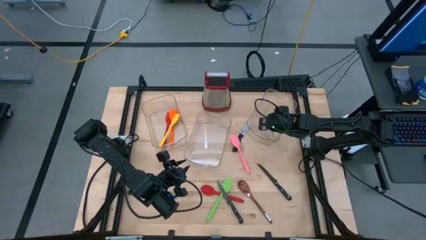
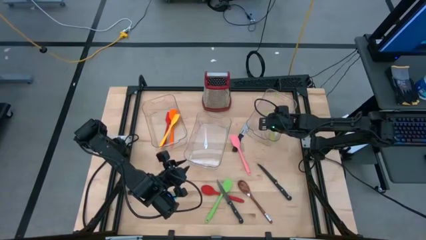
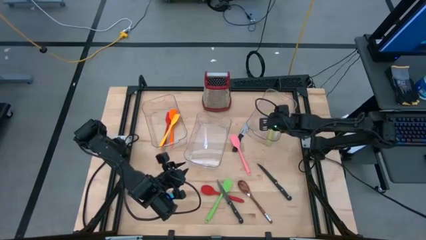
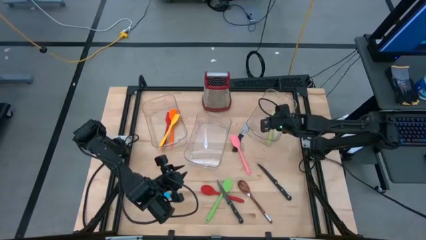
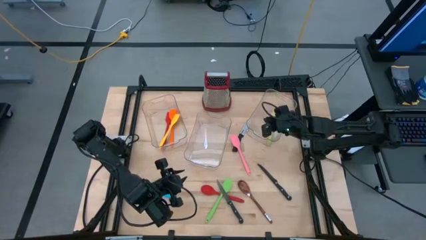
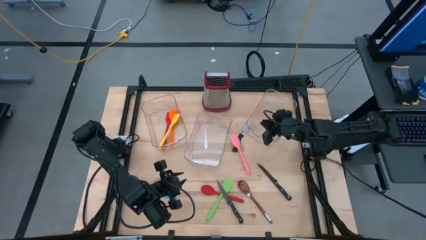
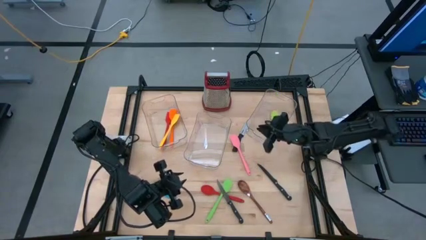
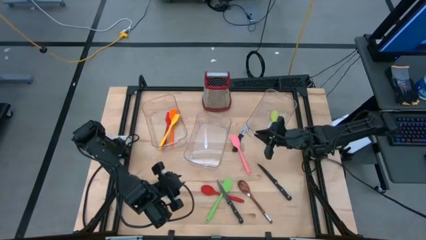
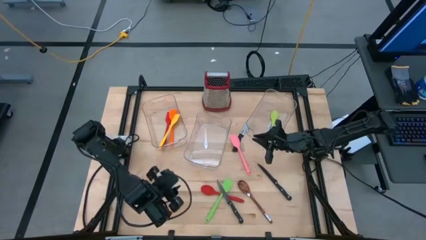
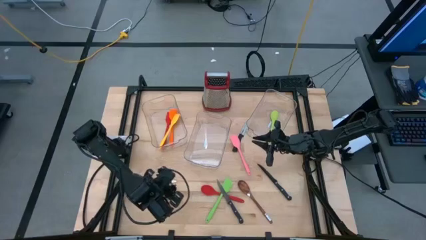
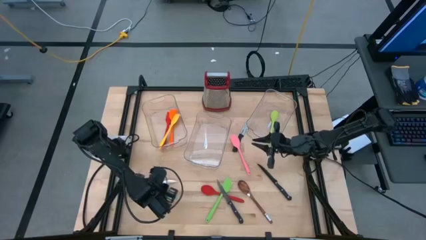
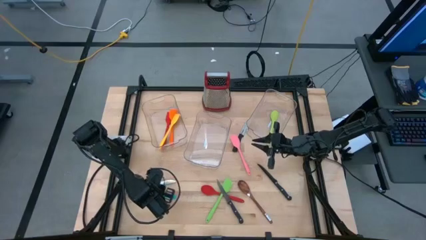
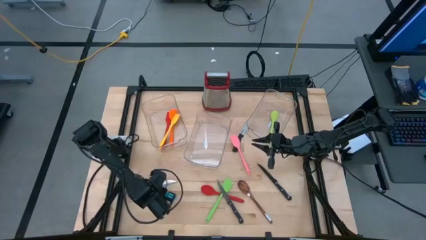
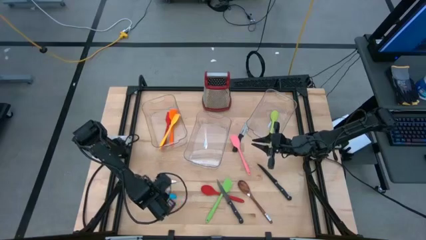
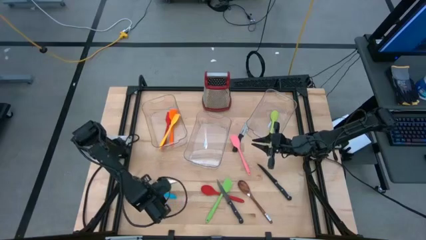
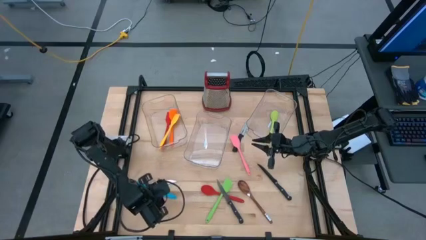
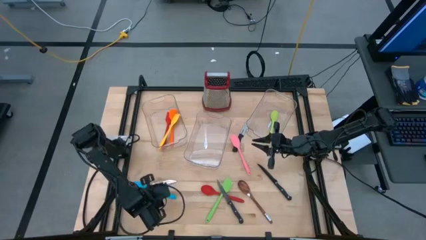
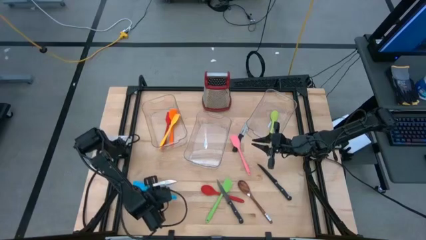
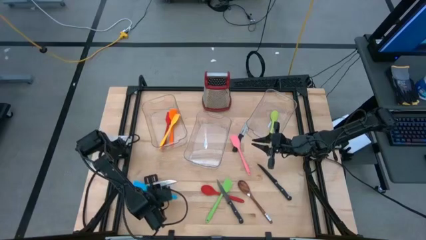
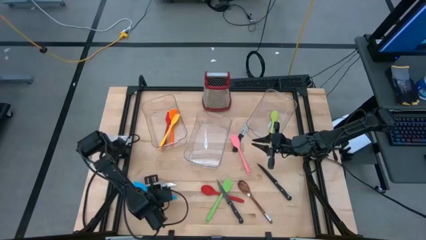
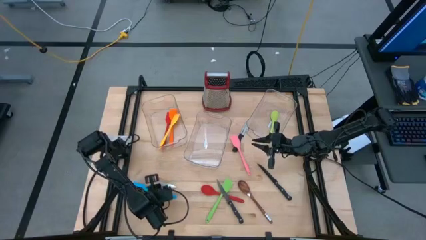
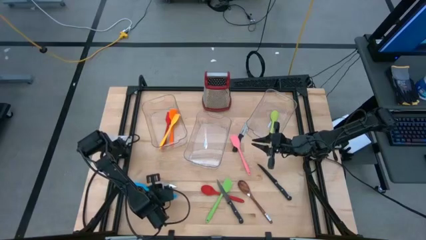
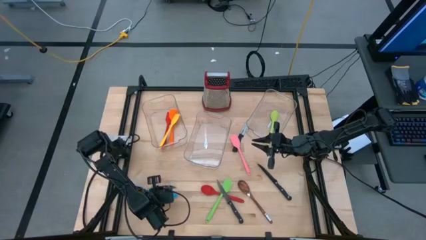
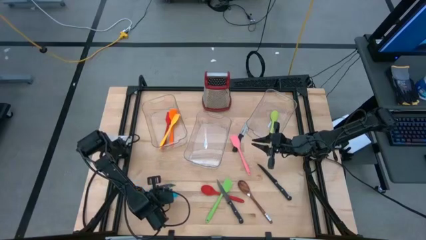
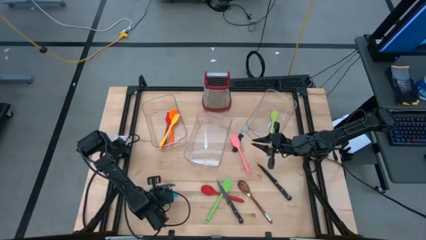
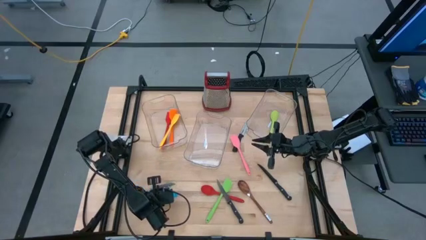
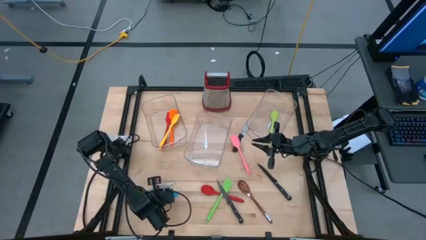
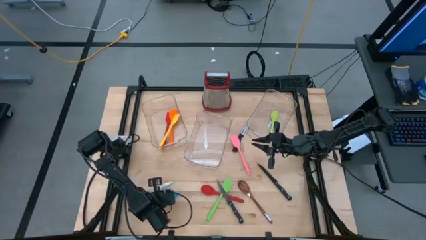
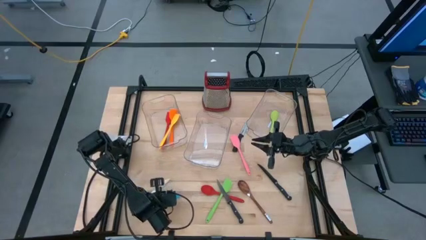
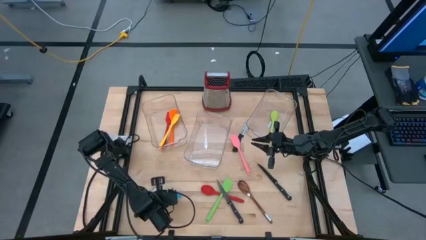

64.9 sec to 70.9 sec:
Task: Pick & Place Kitchen Items
Put the blue spatula into the left transparent bin

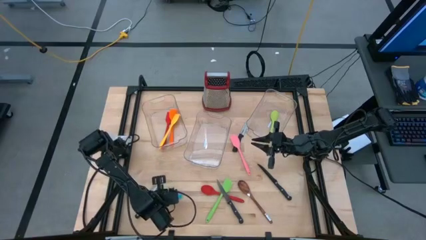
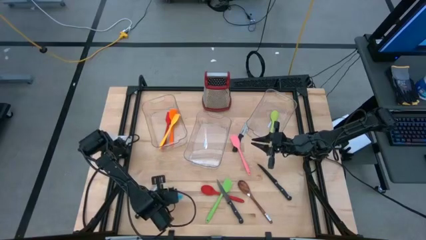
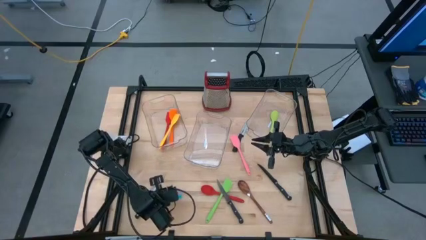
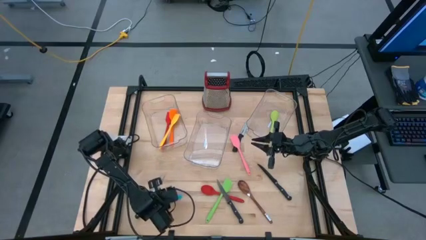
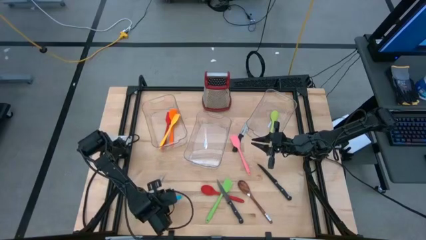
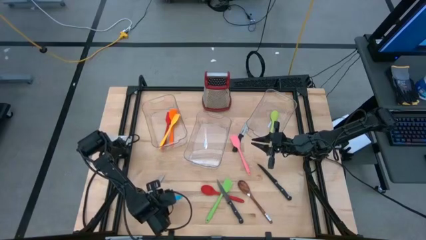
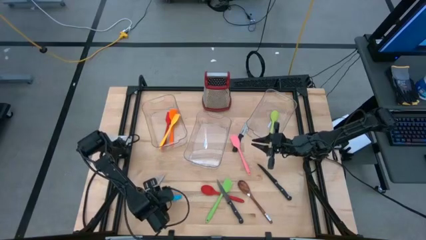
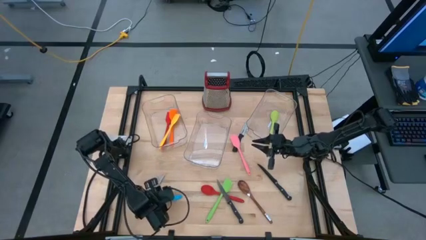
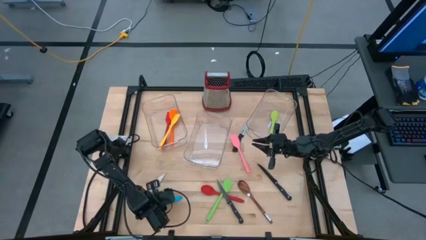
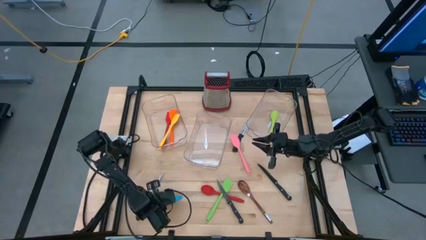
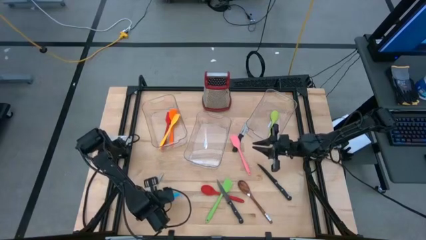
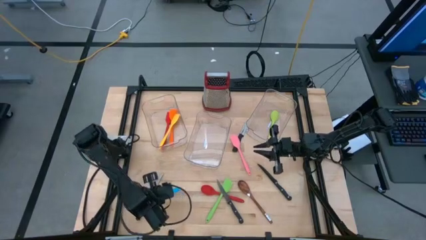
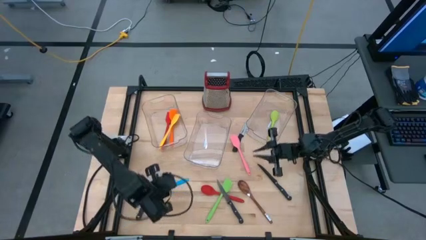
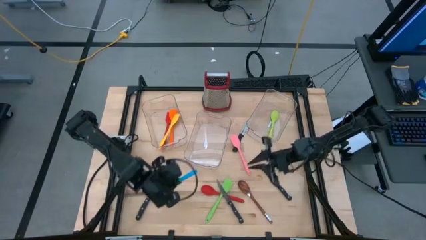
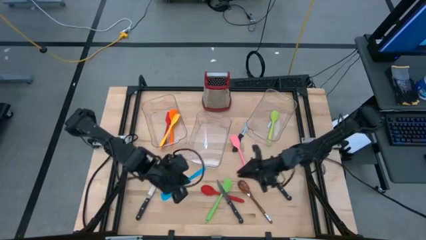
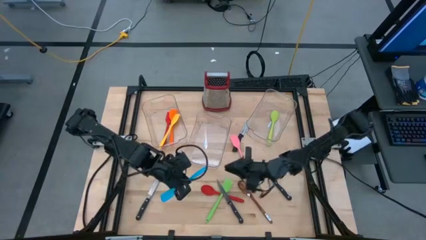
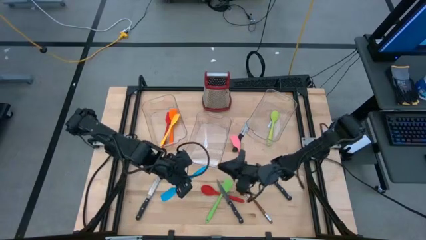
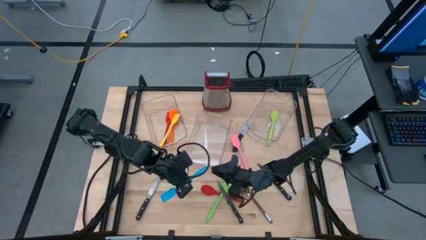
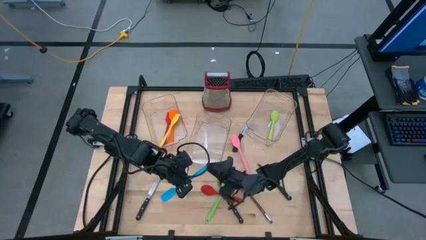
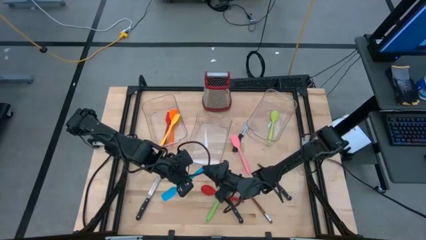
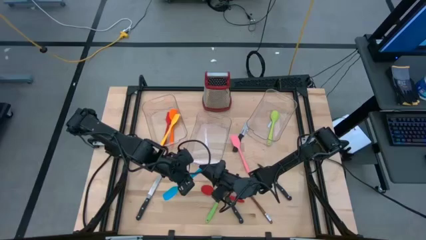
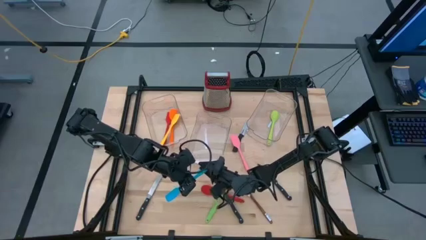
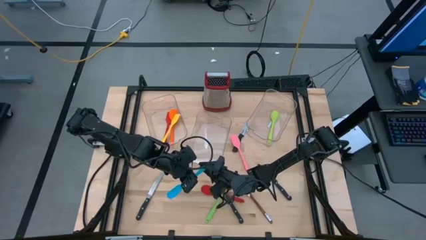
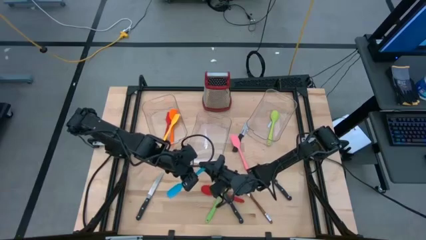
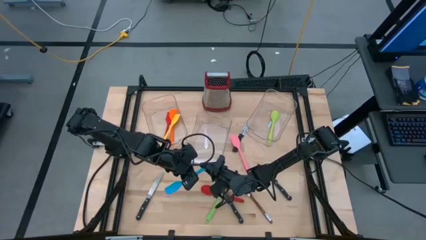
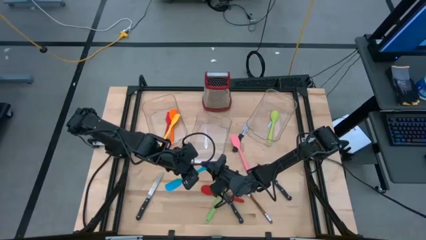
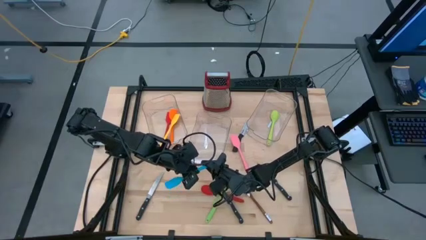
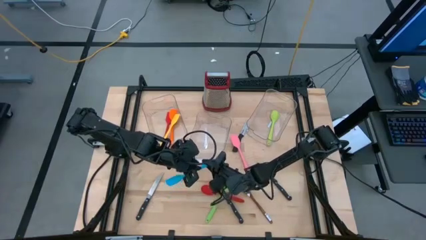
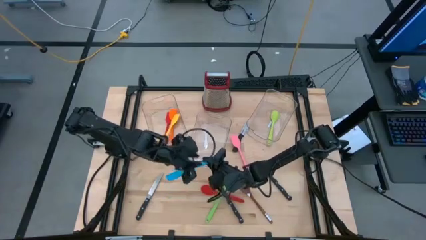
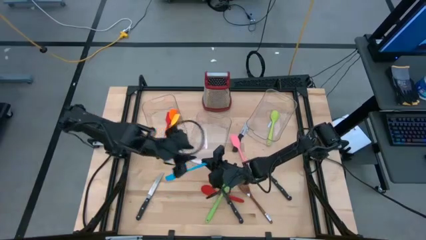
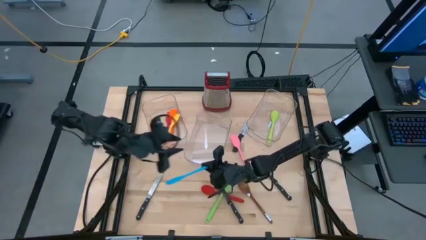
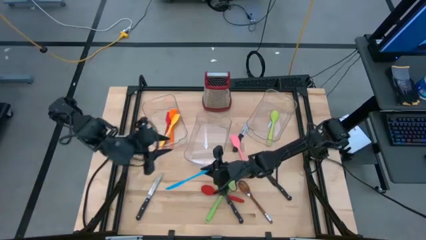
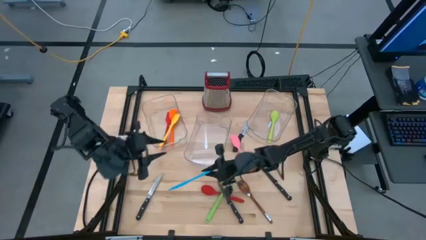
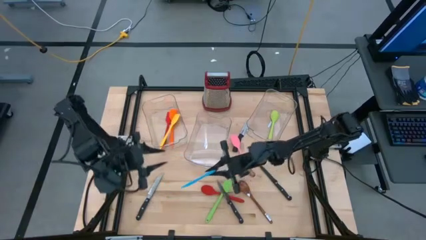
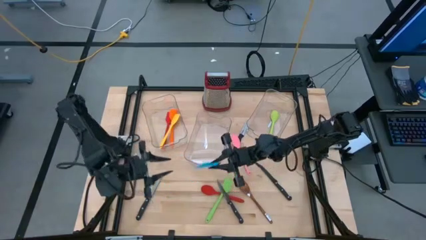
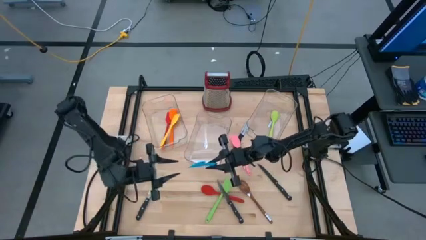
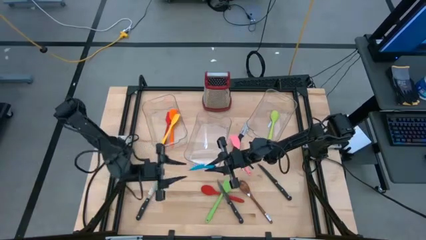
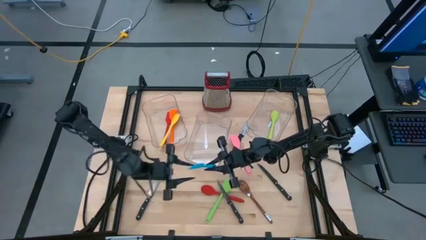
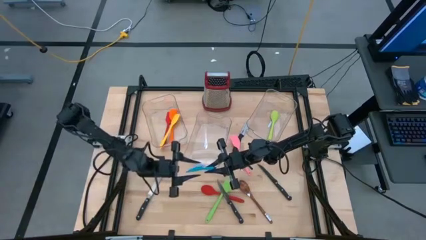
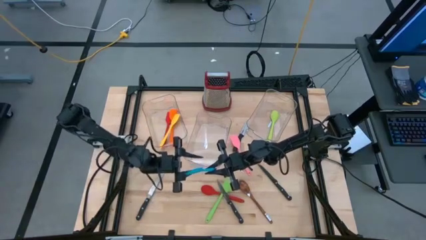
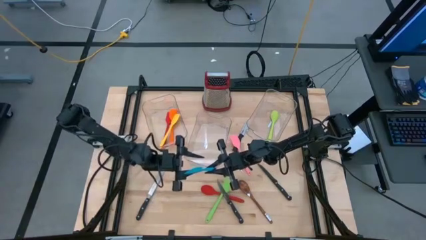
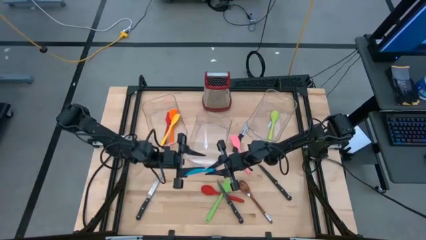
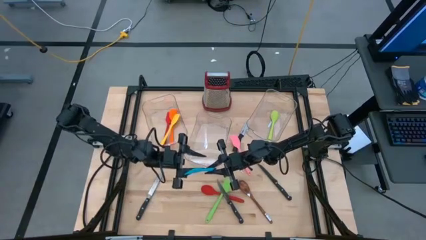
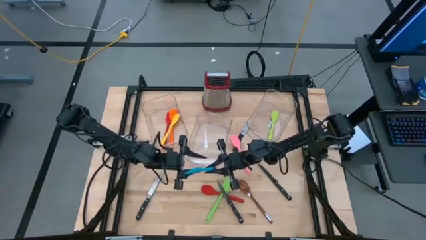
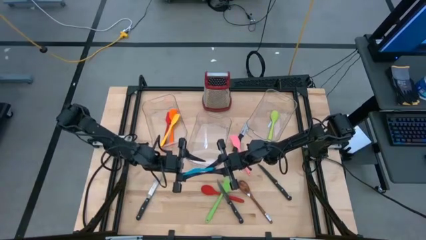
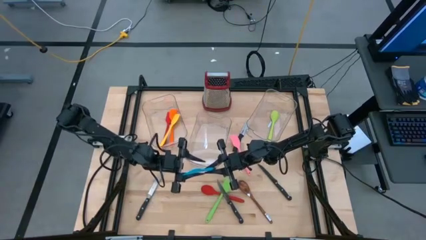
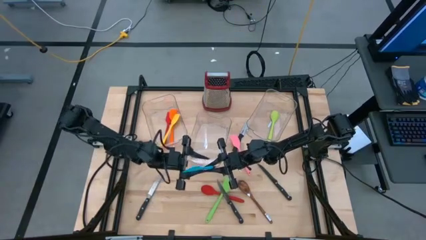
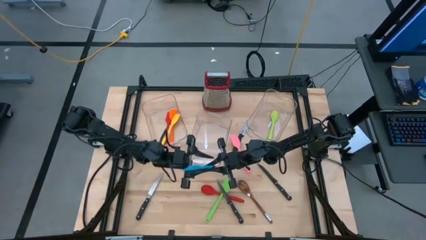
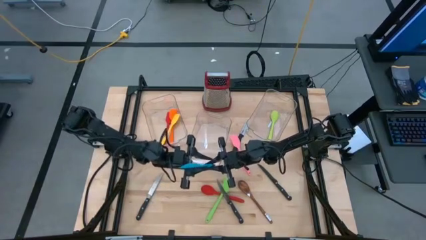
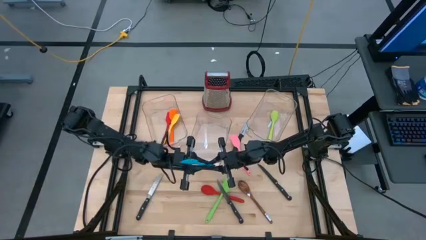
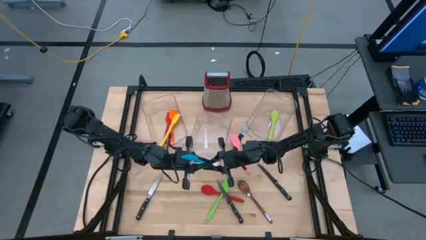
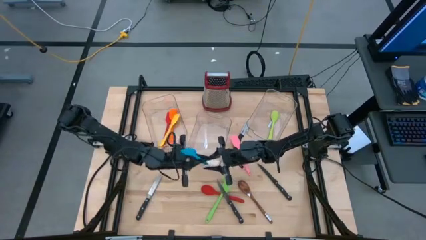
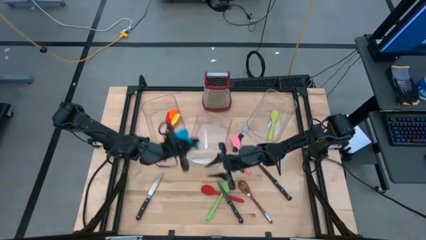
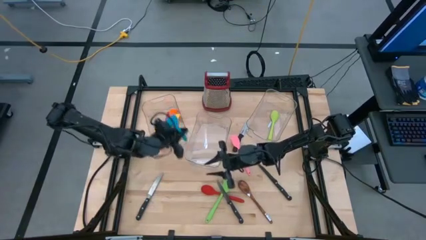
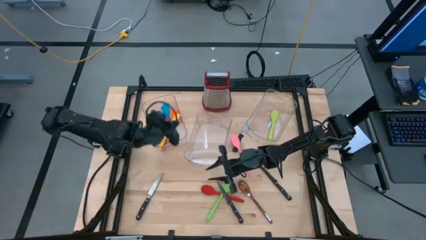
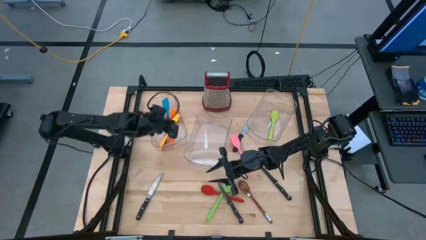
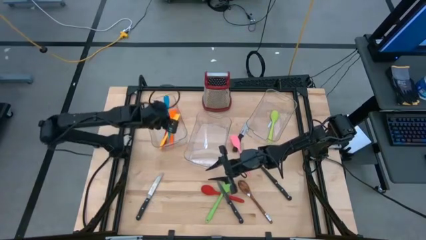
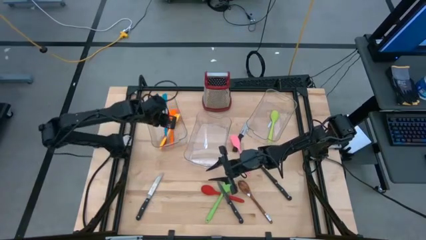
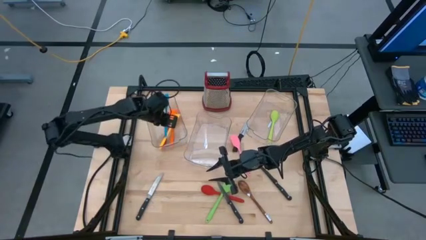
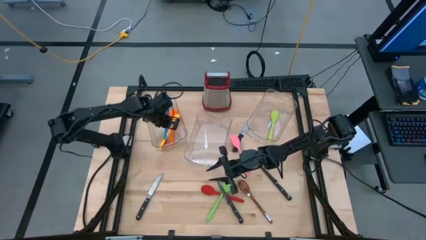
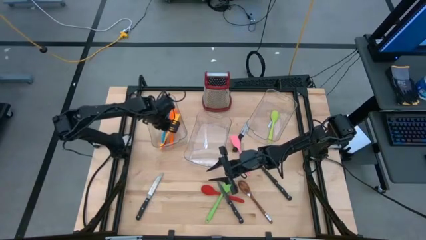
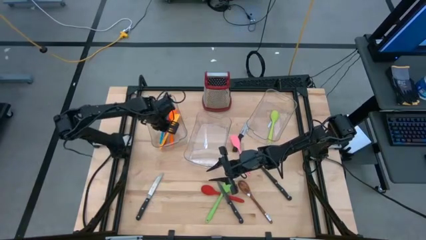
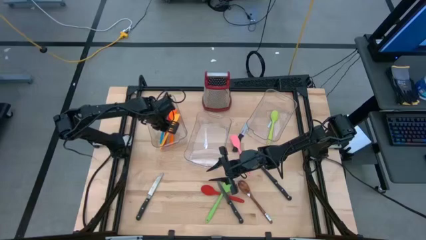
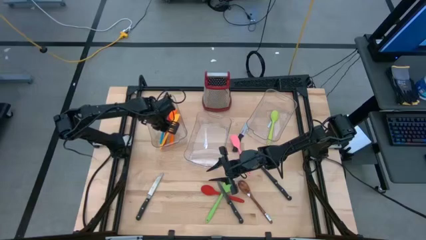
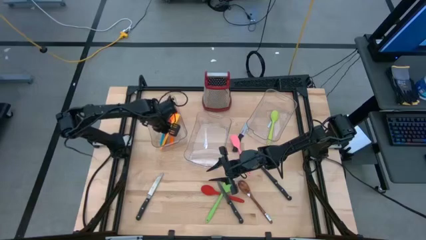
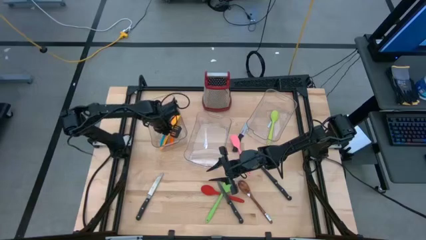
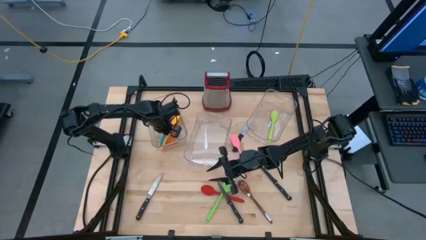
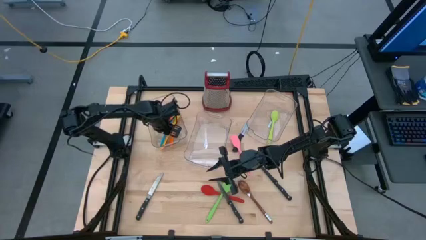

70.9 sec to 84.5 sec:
Put the blue spatula into the left transparent bin
